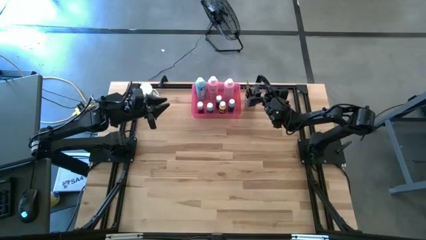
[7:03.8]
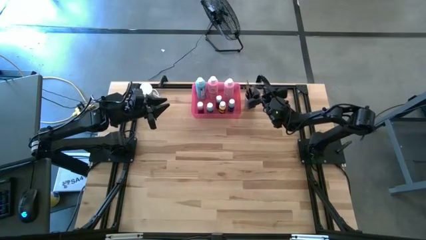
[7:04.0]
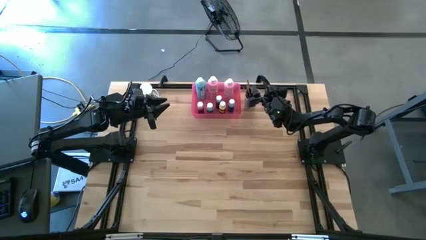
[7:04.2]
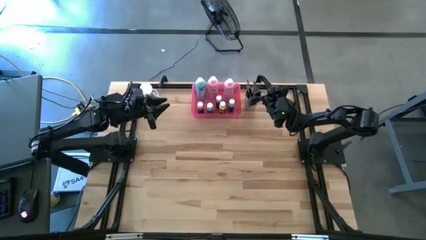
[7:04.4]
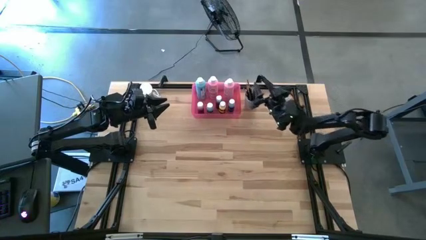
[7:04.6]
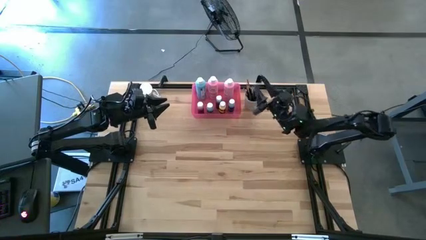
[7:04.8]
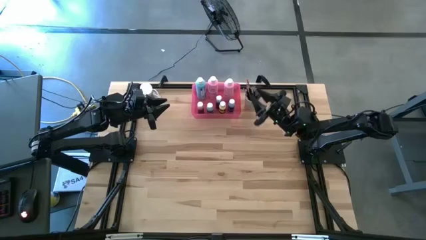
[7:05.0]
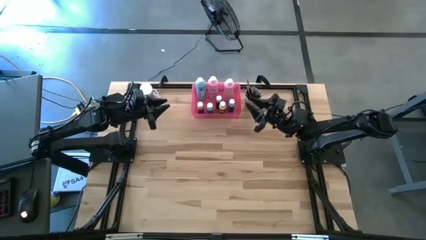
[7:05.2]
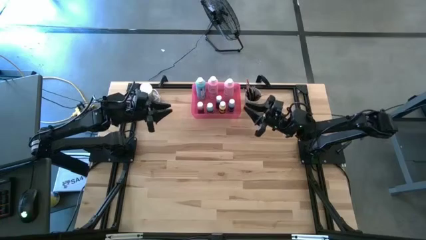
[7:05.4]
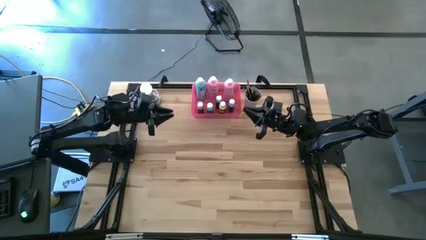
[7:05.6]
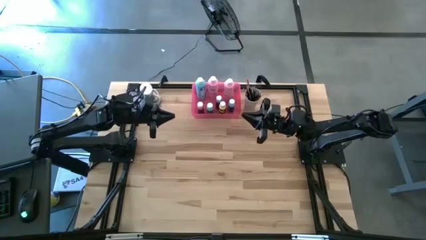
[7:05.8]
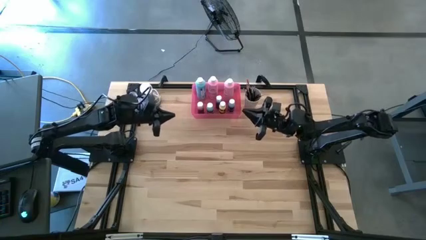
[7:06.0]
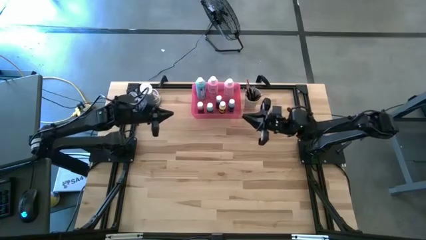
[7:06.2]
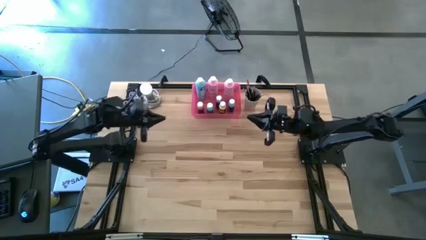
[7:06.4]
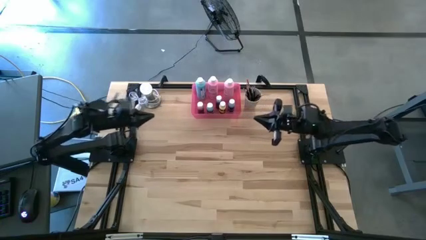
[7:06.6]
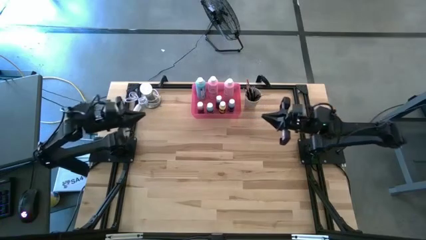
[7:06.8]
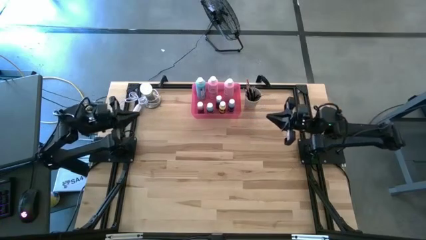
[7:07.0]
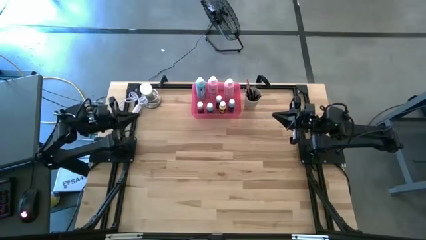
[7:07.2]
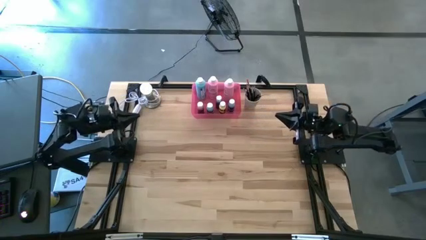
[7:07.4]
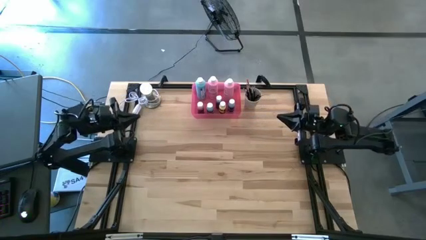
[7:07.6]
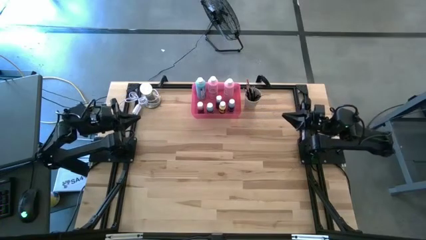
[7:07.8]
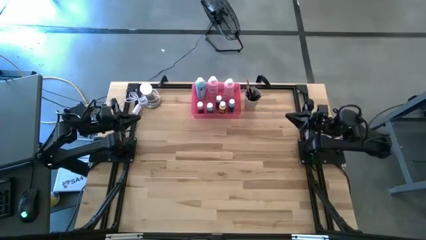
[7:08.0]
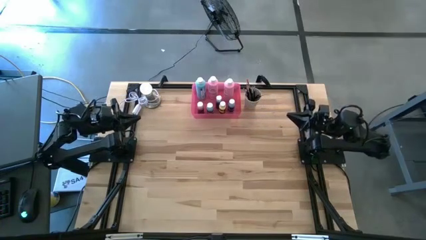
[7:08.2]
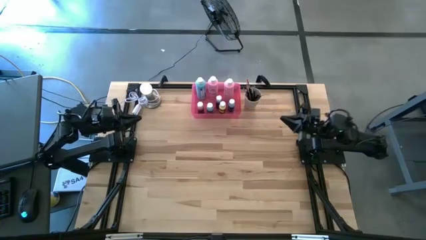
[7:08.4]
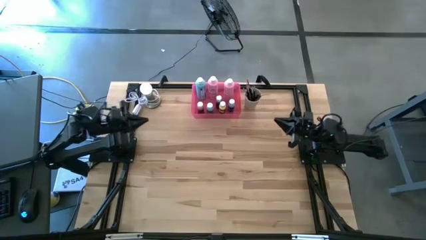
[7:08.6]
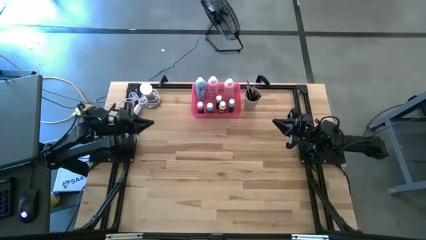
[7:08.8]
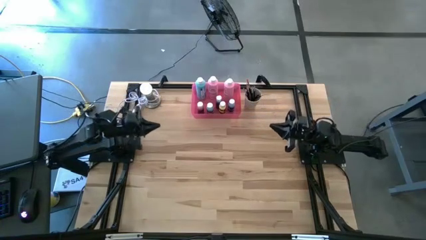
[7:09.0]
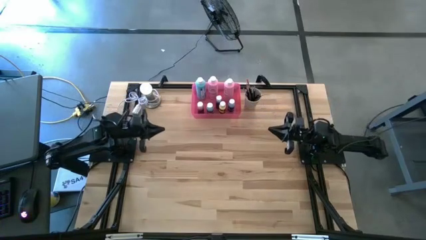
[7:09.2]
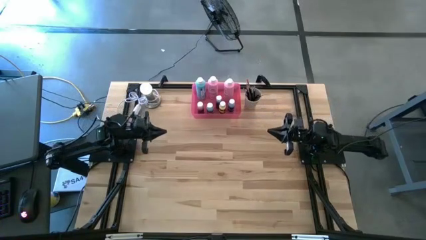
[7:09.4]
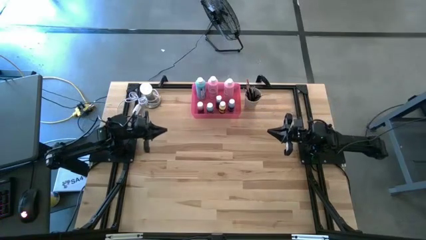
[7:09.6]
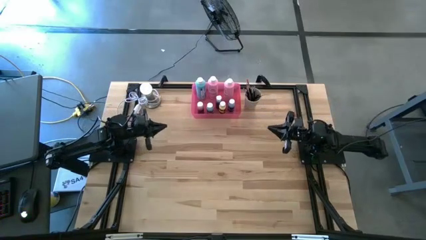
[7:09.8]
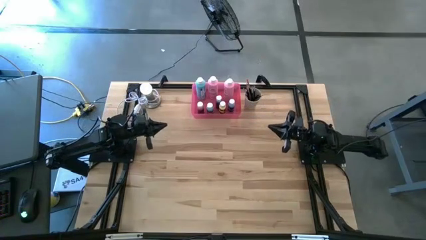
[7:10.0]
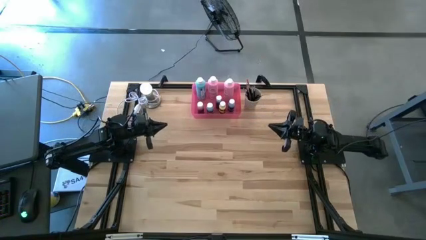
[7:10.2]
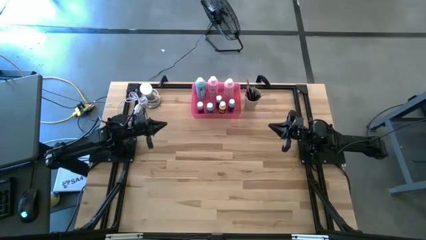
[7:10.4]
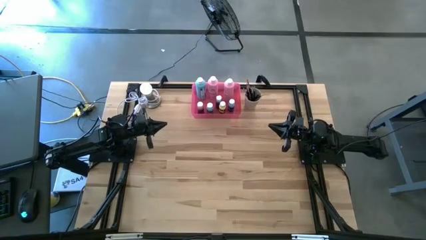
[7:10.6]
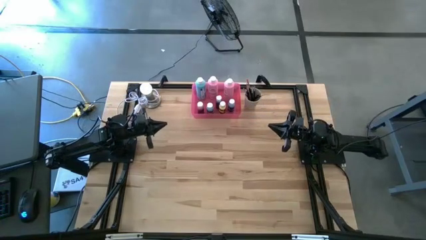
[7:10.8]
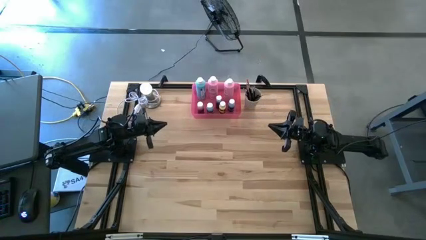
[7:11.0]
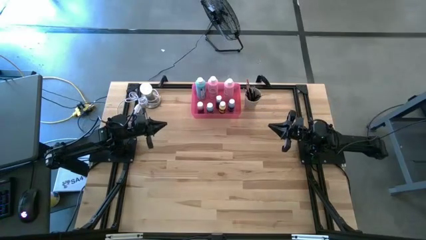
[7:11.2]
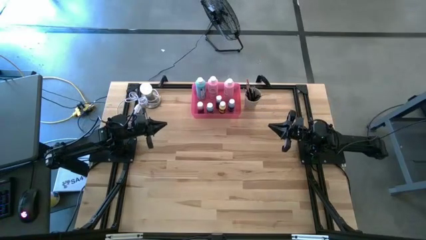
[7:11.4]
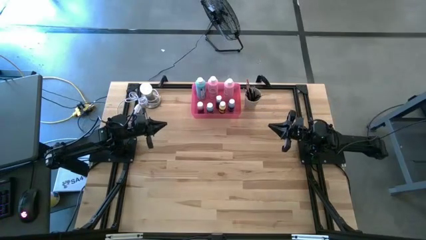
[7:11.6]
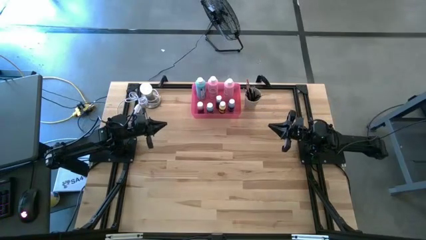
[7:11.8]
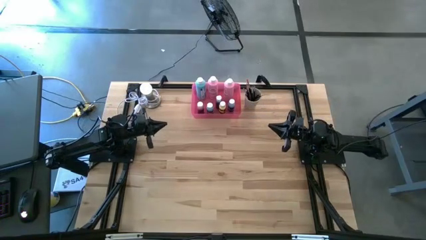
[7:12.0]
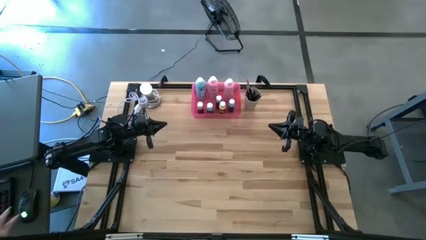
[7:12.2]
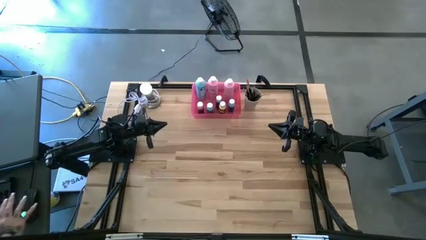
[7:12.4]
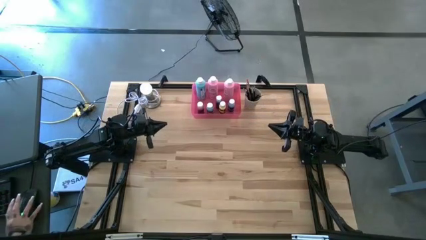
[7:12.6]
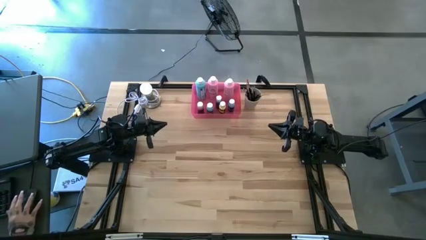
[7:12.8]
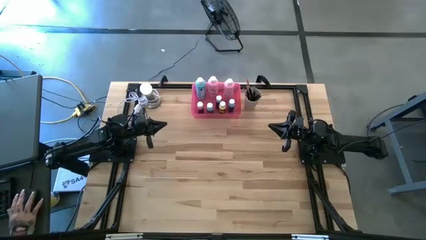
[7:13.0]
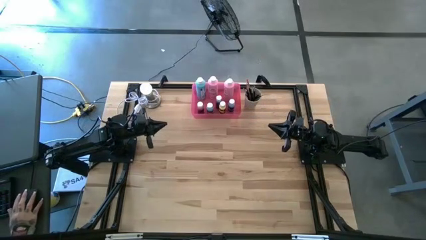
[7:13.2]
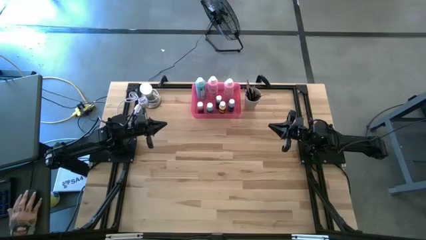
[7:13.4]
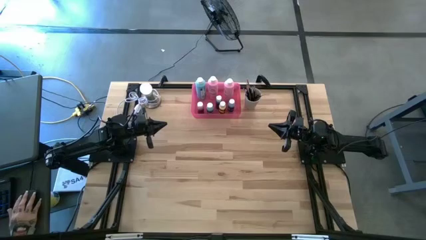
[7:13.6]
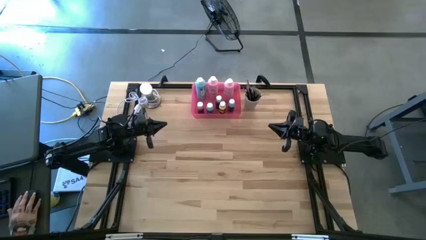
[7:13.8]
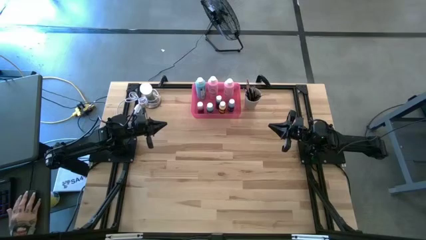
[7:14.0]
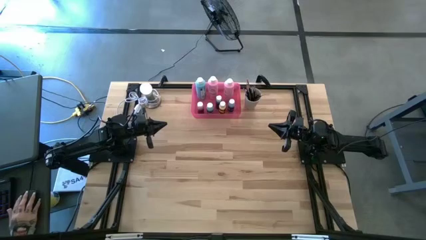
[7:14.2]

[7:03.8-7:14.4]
Task: Pick & Place Paint Supplies
Return to Home Position
